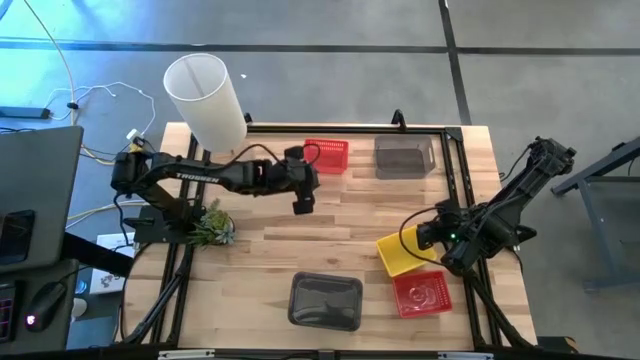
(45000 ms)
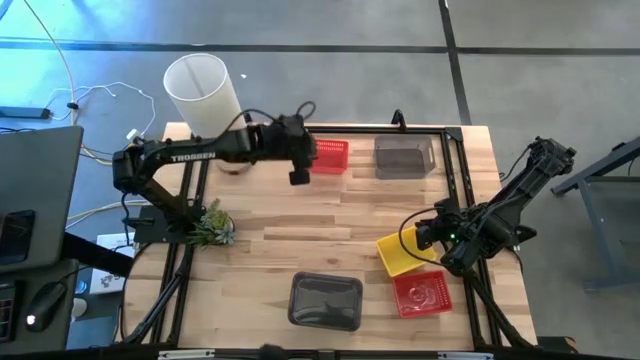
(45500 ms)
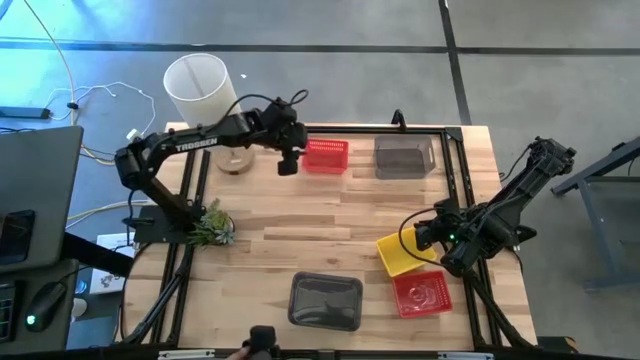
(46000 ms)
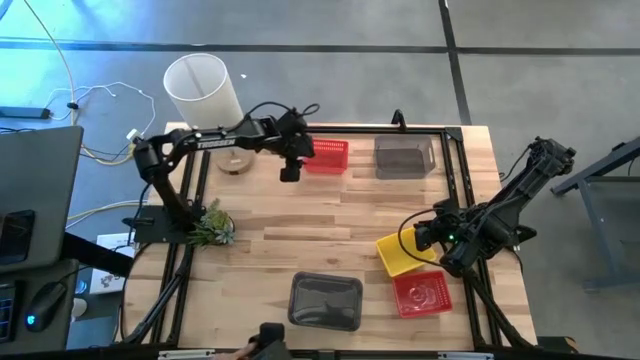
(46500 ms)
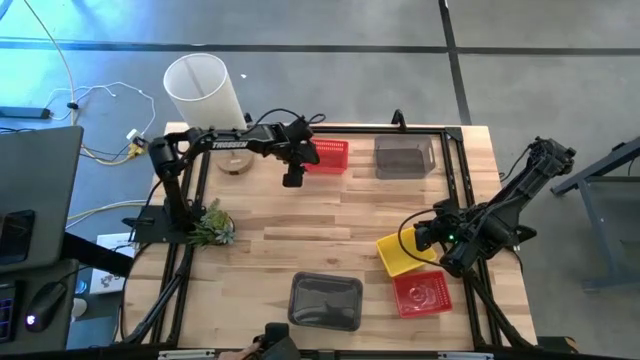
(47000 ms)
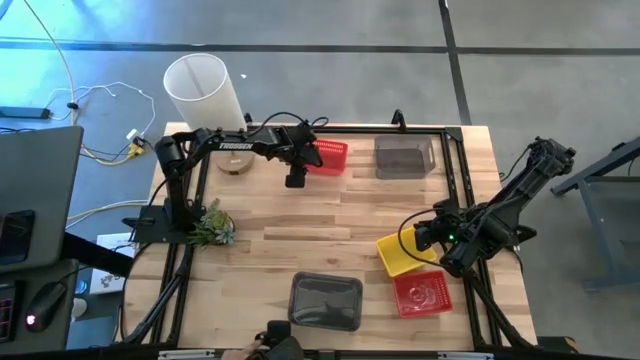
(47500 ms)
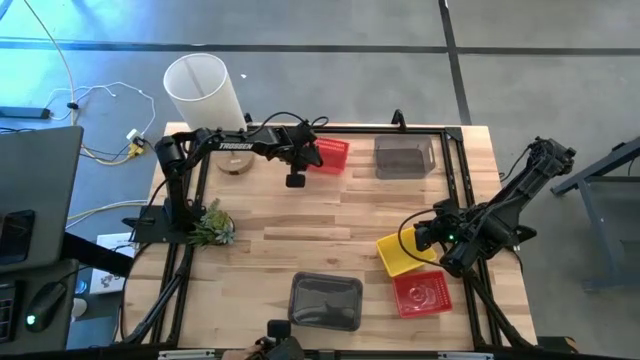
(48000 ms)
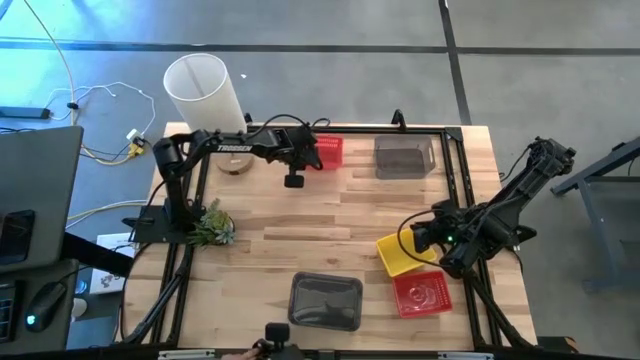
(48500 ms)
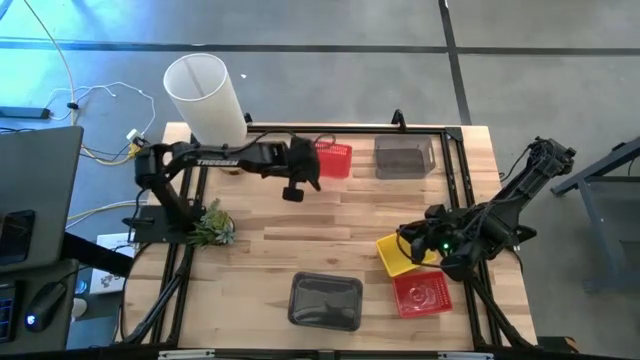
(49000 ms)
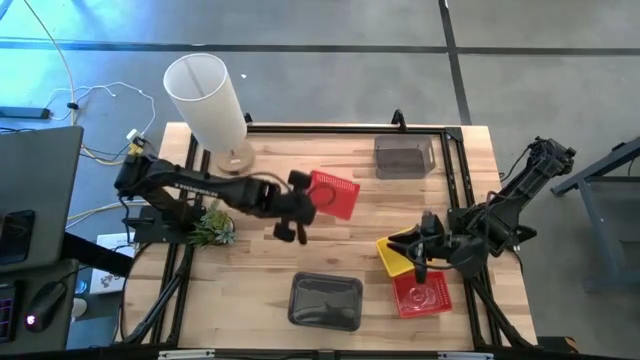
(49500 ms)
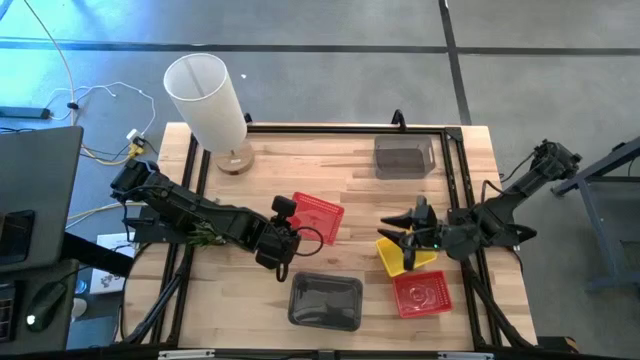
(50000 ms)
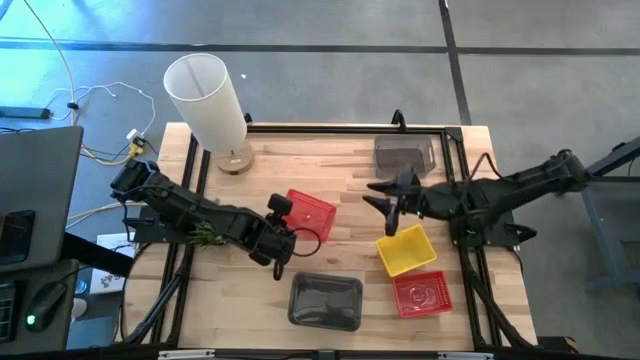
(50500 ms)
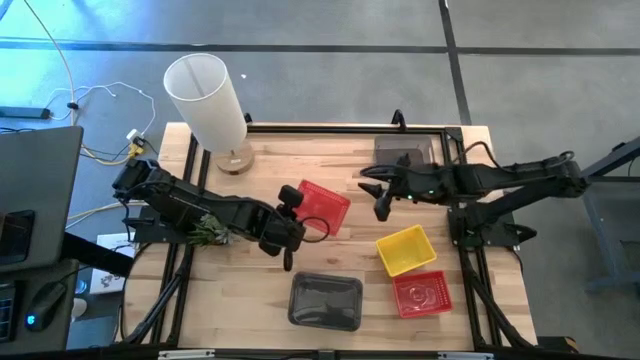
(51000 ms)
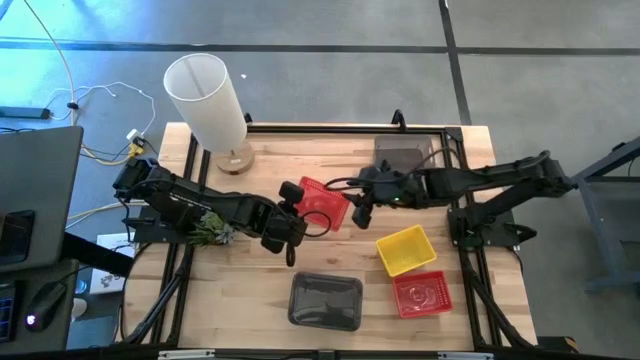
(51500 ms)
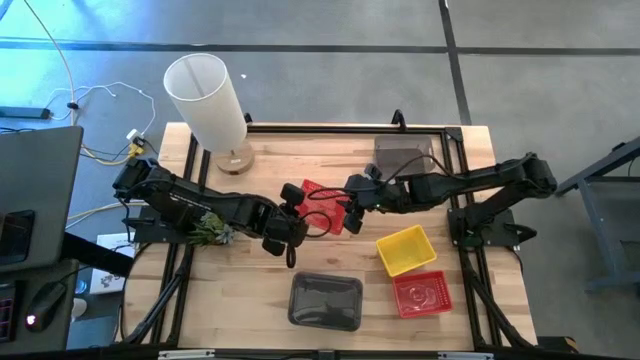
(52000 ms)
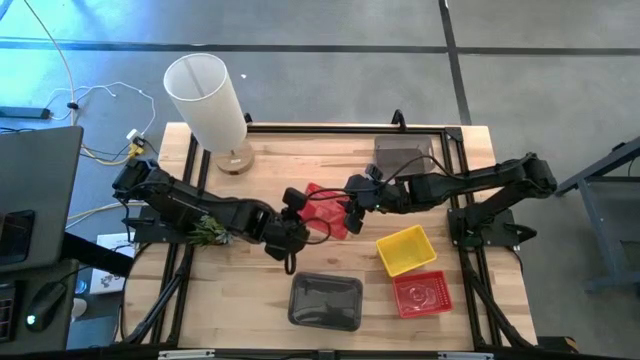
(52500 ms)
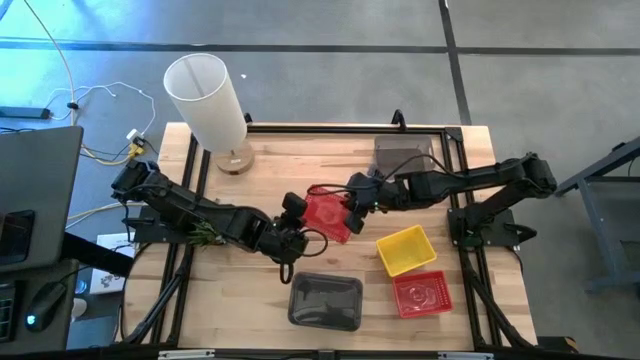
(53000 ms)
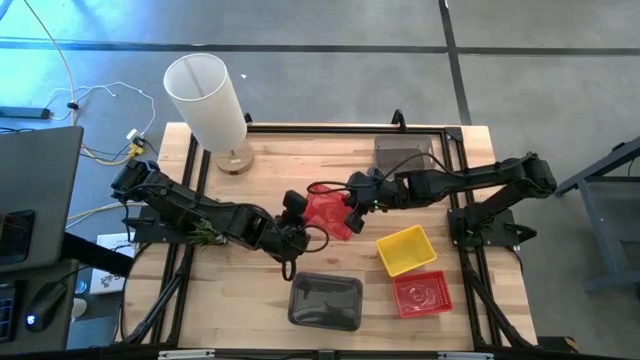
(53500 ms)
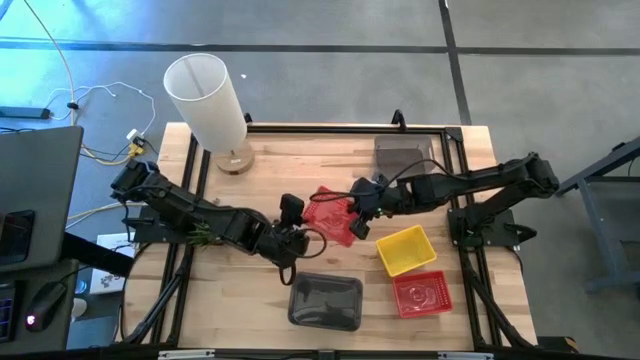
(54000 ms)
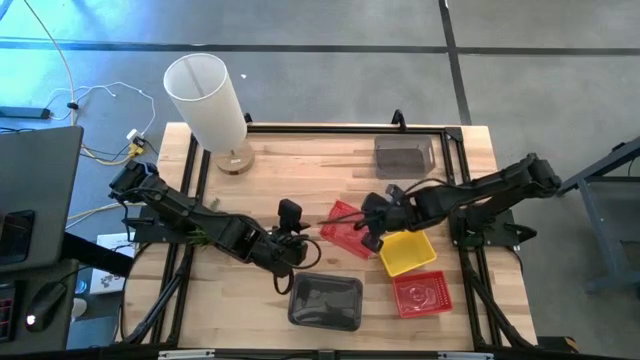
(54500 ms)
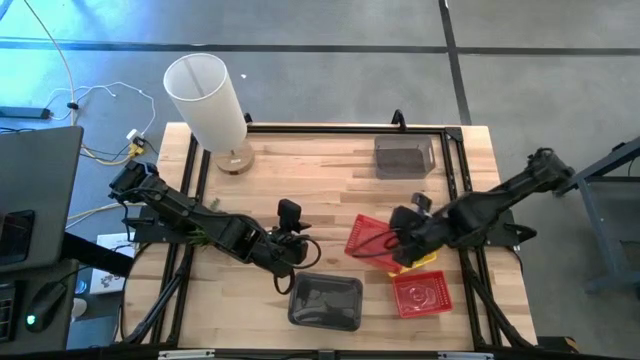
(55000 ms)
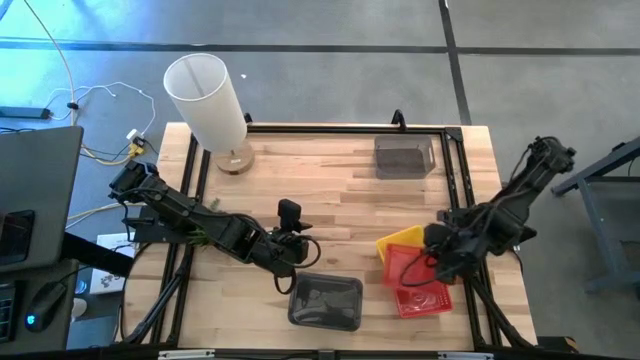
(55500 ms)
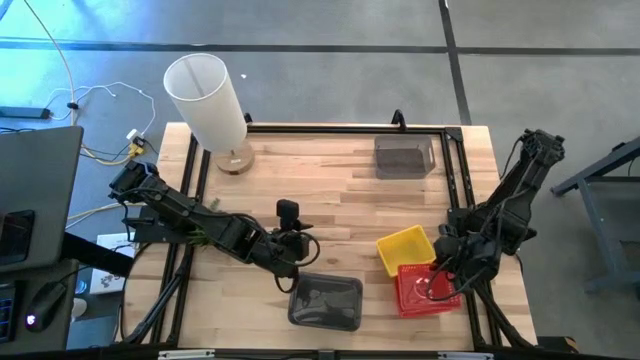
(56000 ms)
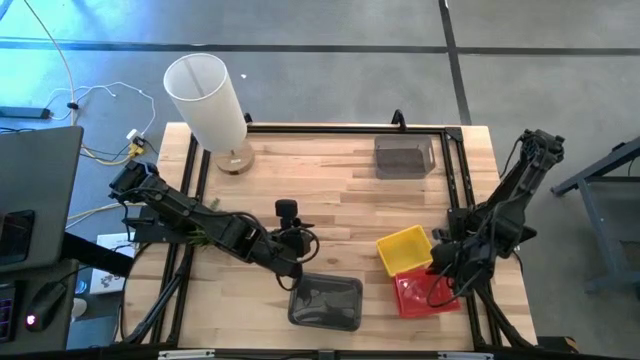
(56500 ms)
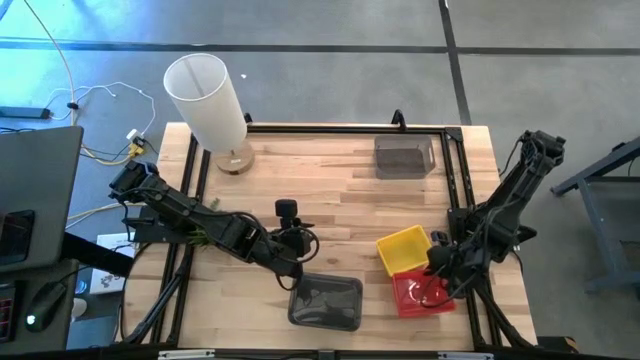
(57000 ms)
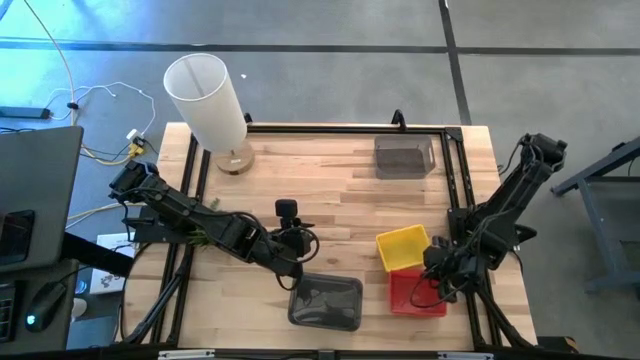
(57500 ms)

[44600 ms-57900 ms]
Stack the top red bin into the stacked red bins

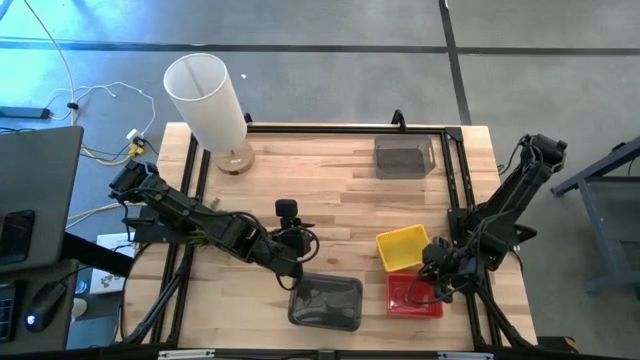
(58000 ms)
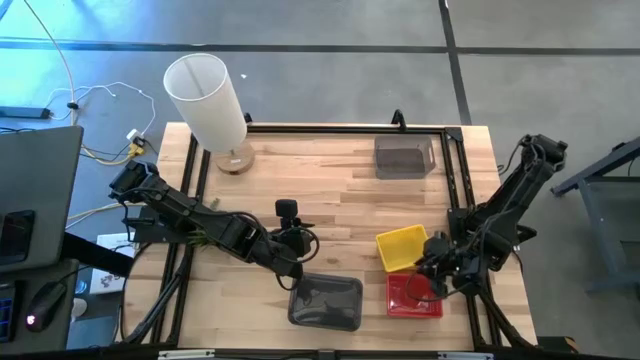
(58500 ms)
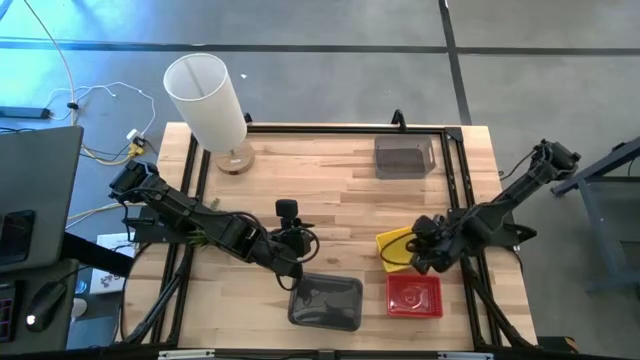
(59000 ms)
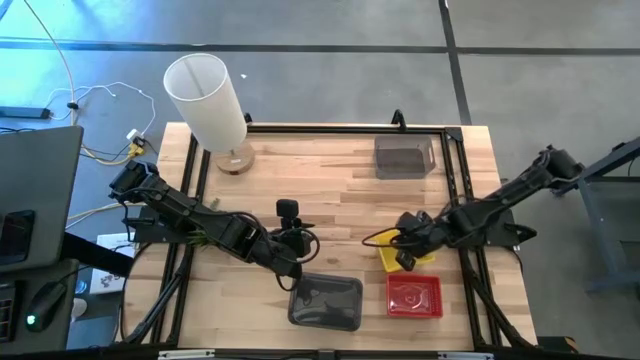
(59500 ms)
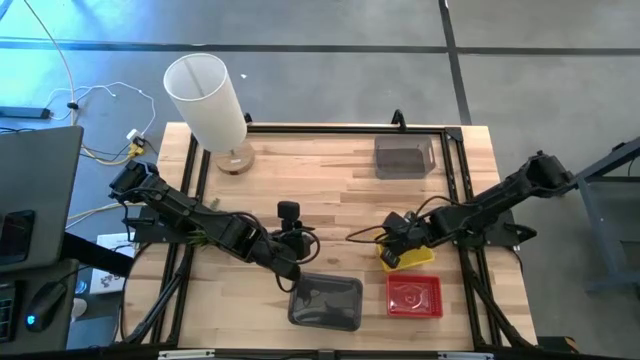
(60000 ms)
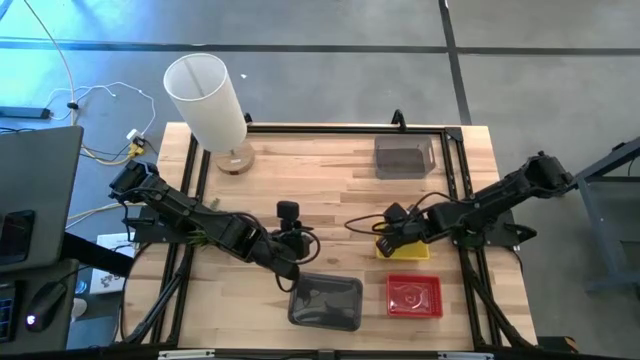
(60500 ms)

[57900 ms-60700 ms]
Adjust the yellow bins
